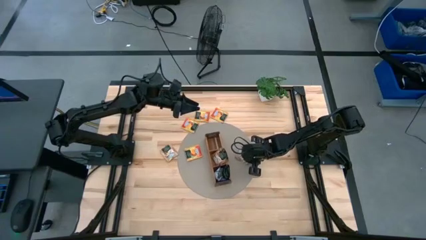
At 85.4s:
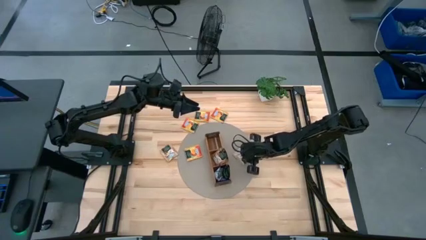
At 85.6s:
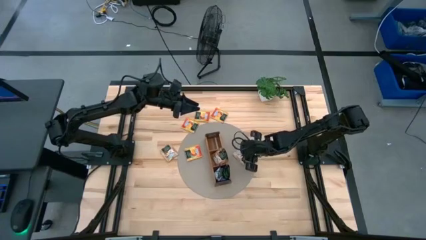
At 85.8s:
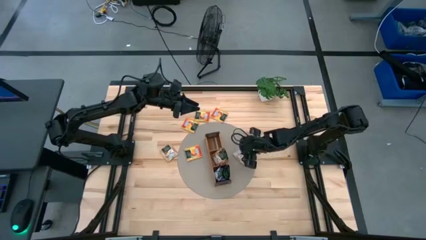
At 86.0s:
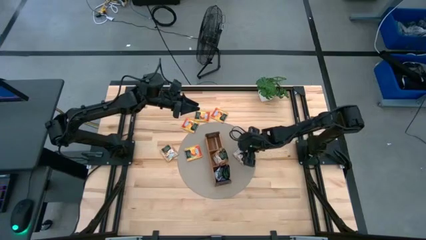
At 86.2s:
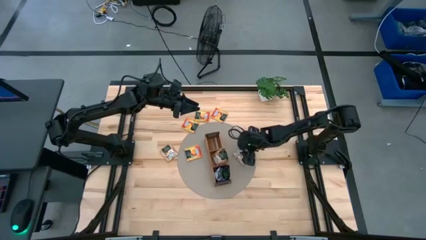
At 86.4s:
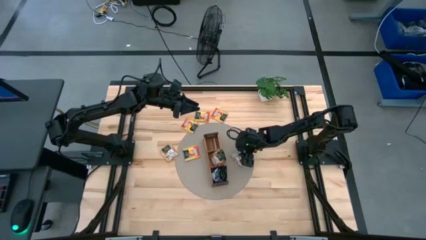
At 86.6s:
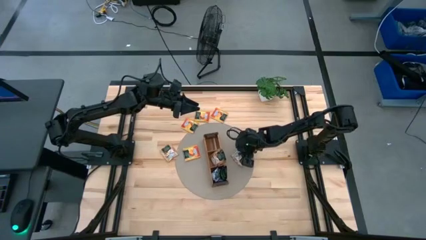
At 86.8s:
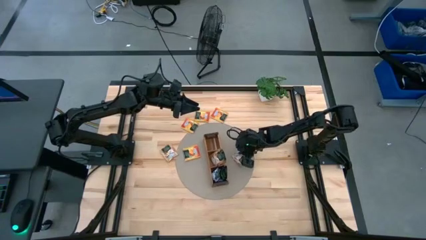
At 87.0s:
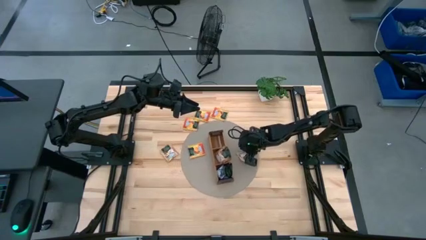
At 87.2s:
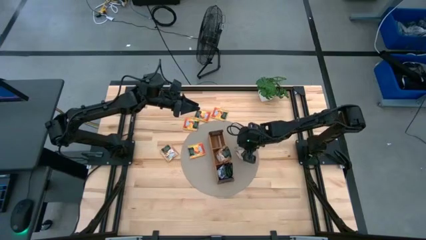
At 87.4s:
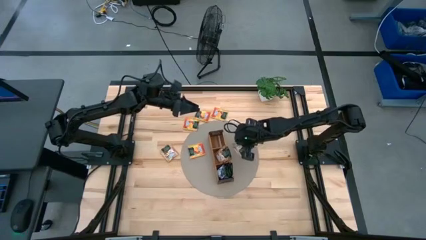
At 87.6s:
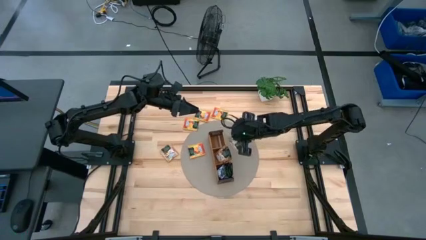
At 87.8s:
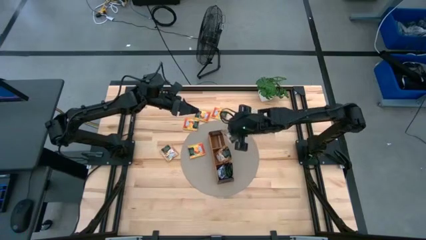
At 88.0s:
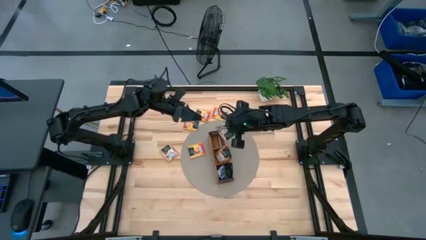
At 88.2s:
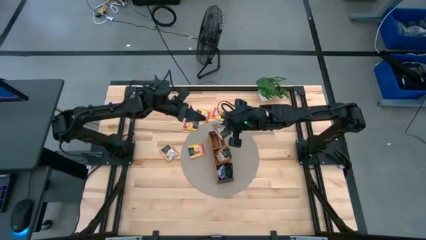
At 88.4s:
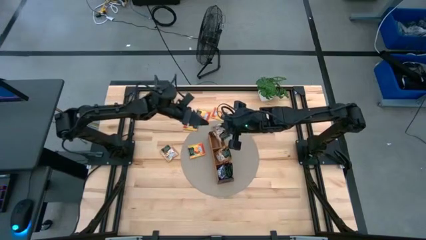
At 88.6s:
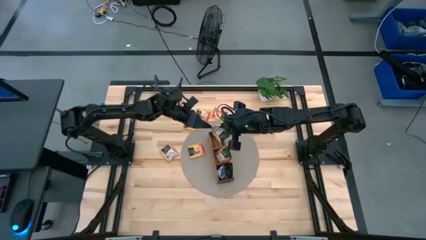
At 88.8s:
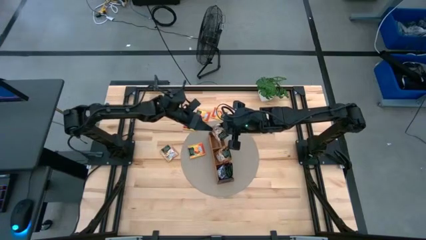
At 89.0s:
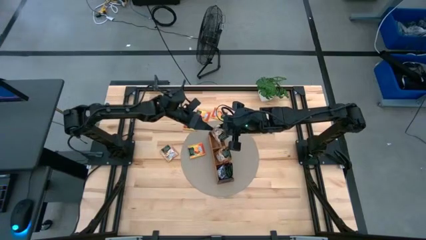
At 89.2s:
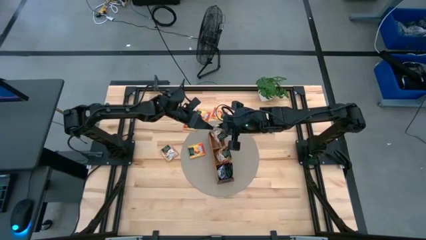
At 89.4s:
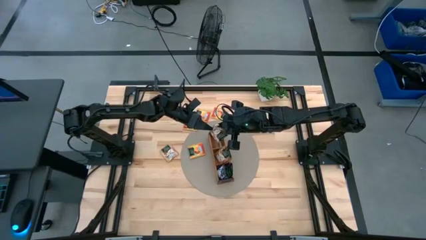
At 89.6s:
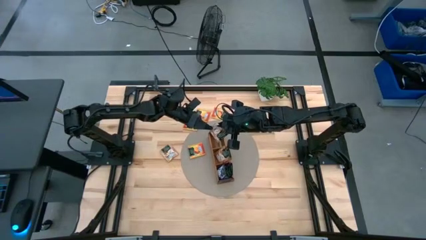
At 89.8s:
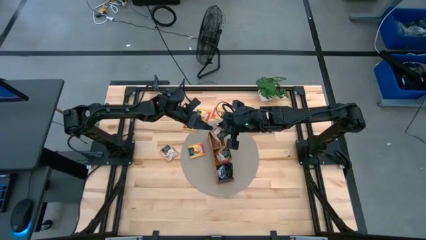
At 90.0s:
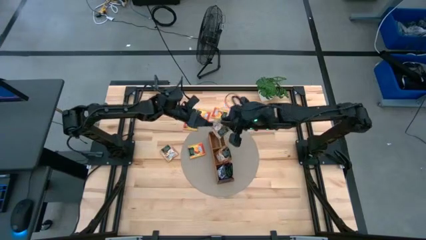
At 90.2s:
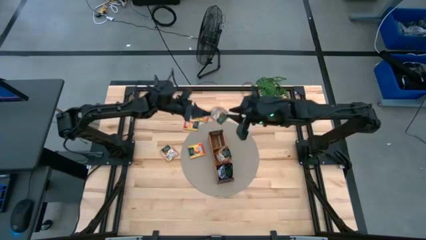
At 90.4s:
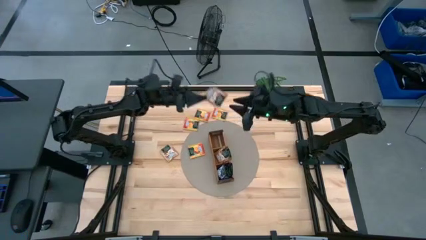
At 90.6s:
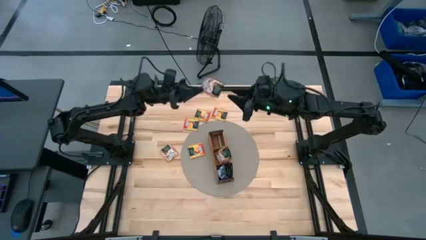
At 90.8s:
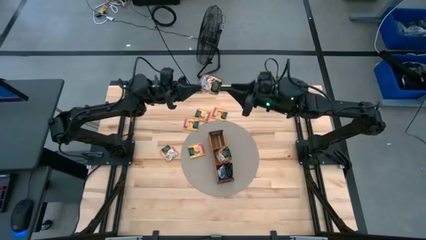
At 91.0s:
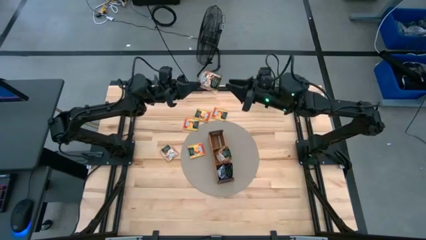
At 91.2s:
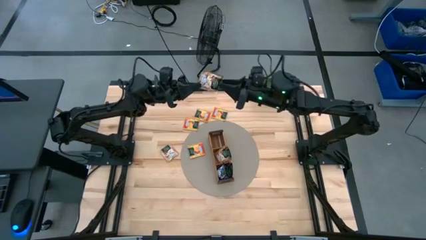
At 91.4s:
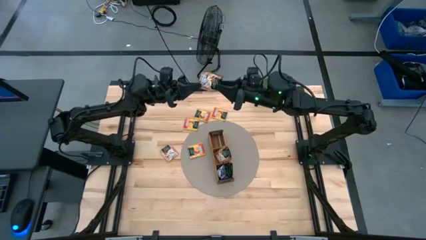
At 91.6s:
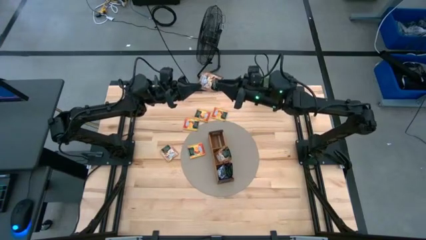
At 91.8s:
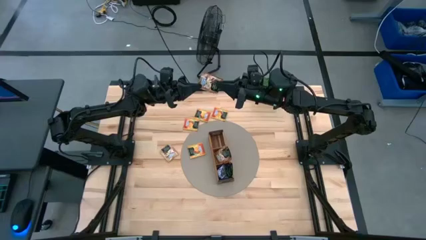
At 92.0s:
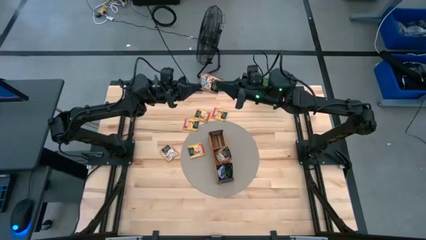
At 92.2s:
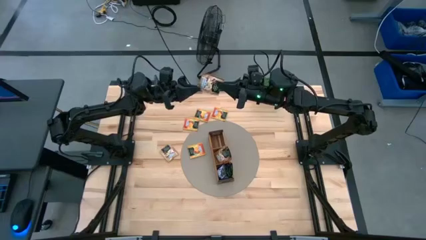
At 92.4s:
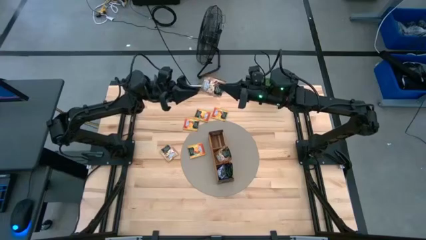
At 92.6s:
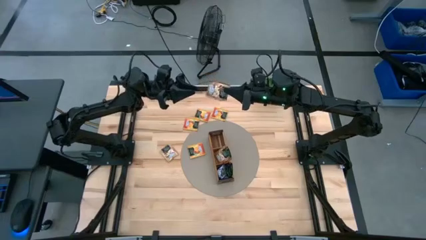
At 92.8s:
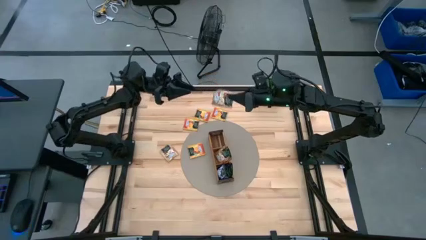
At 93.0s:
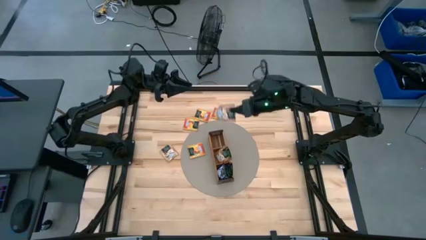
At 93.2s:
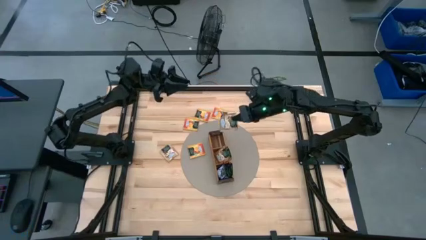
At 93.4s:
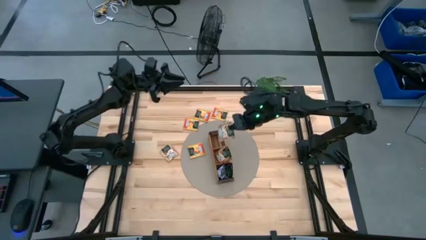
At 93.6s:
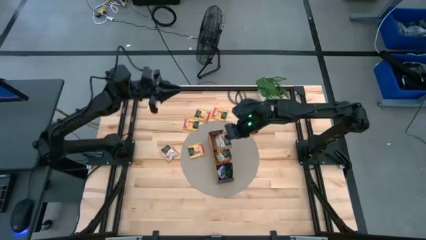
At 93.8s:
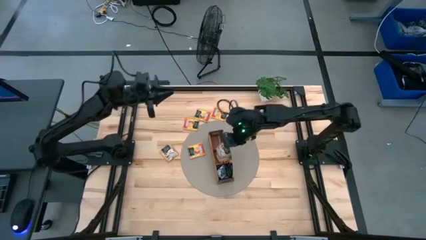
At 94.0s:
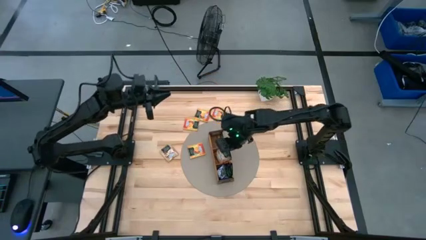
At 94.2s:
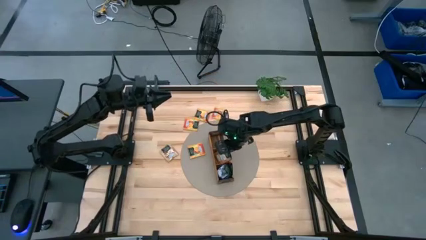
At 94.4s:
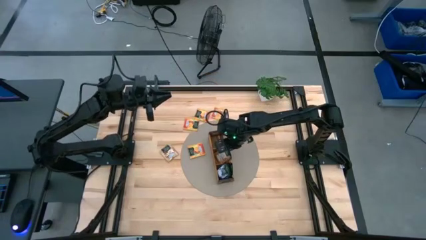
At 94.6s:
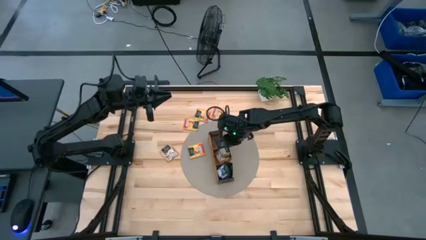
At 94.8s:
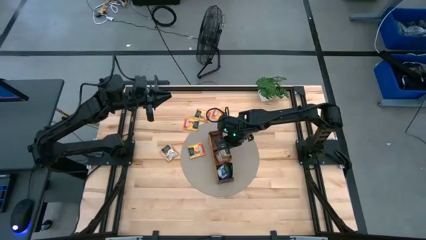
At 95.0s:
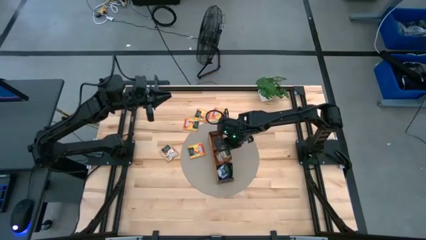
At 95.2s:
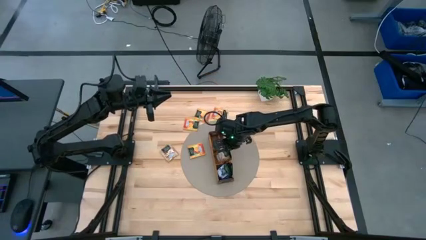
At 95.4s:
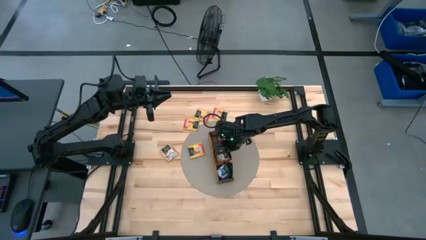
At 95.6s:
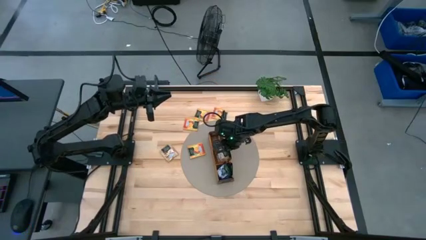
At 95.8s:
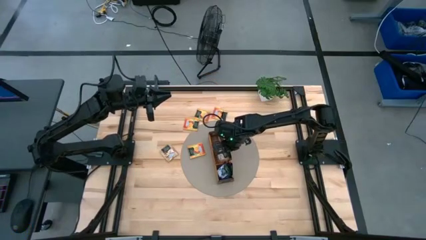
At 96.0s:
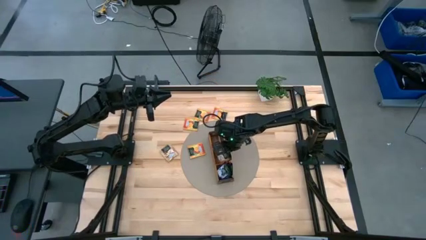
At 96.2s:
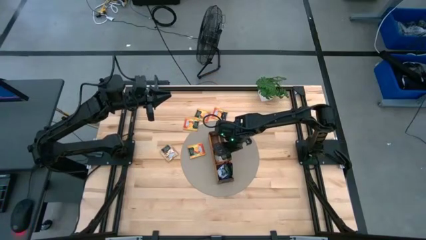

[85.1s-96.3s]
Task: Pick & Place Tea
Put the brown tea bag into the middle section of the wooden organizer

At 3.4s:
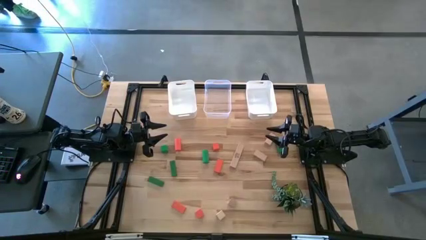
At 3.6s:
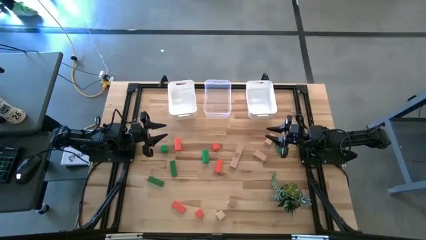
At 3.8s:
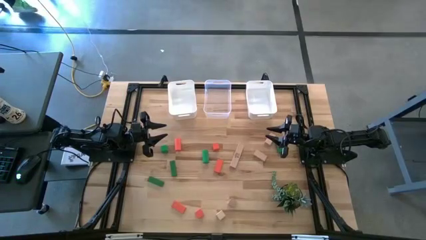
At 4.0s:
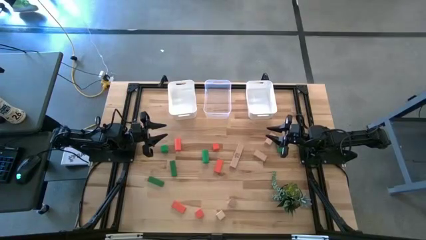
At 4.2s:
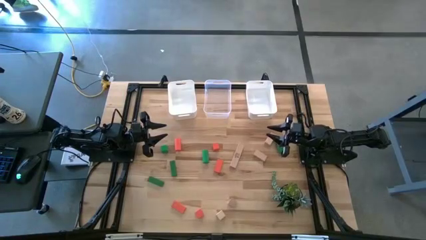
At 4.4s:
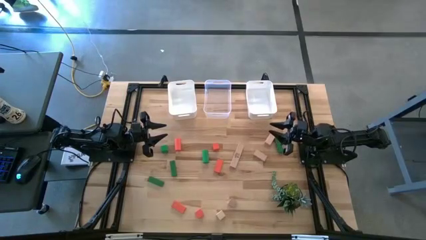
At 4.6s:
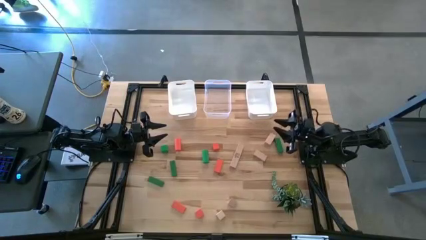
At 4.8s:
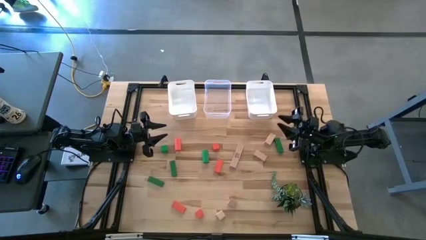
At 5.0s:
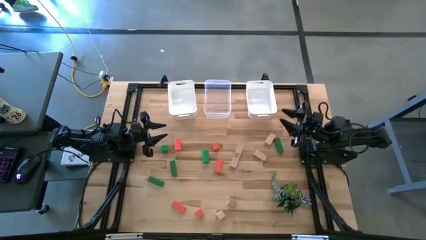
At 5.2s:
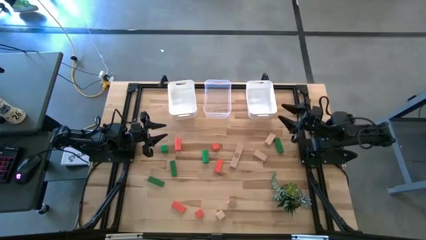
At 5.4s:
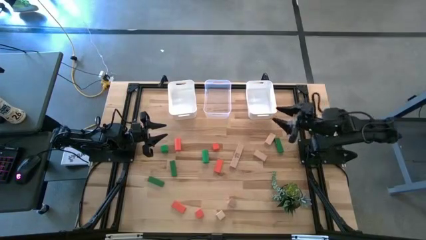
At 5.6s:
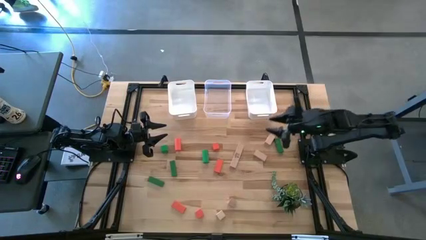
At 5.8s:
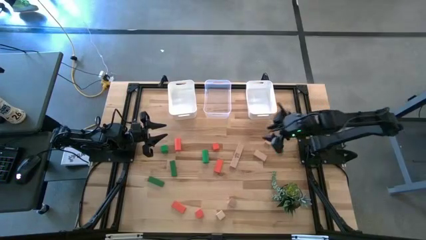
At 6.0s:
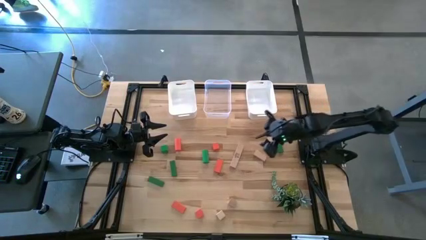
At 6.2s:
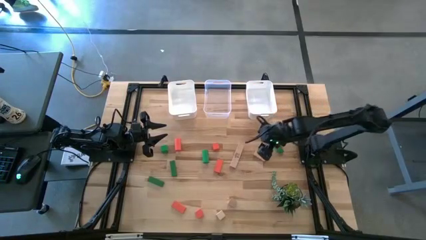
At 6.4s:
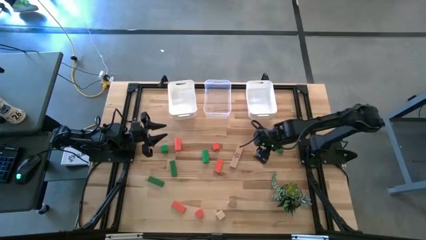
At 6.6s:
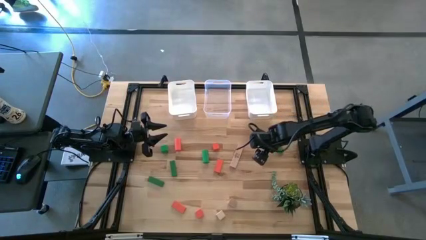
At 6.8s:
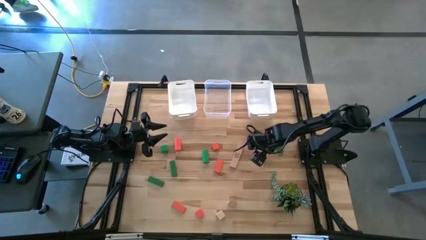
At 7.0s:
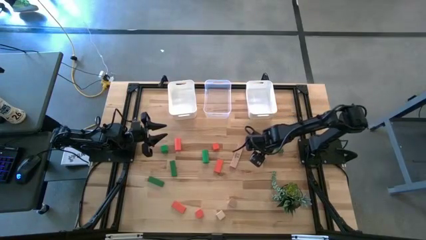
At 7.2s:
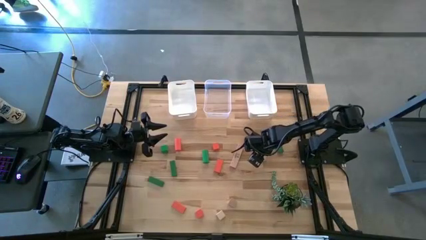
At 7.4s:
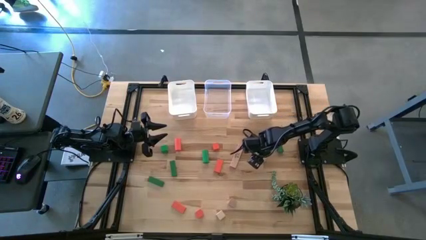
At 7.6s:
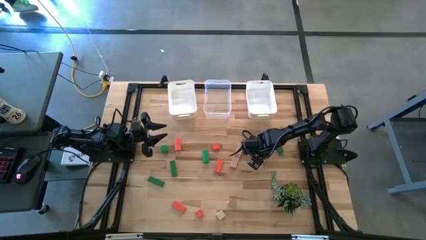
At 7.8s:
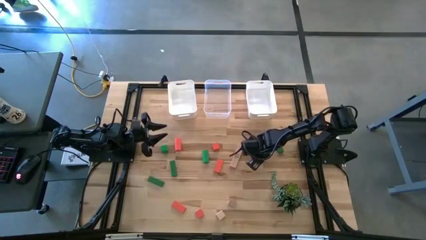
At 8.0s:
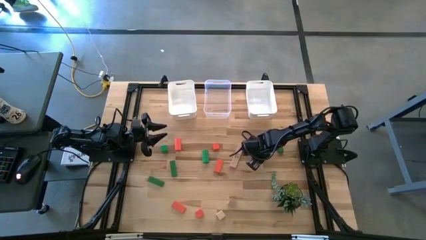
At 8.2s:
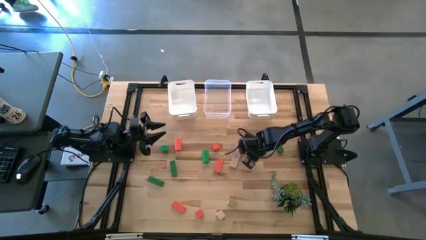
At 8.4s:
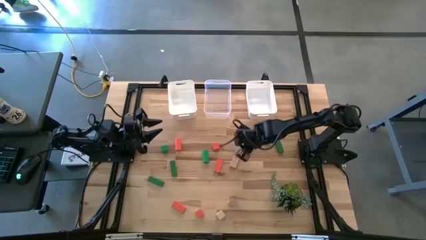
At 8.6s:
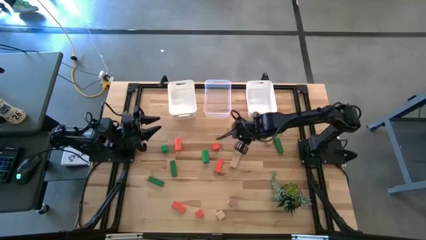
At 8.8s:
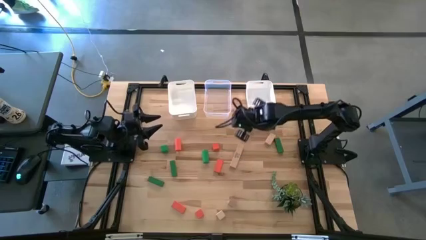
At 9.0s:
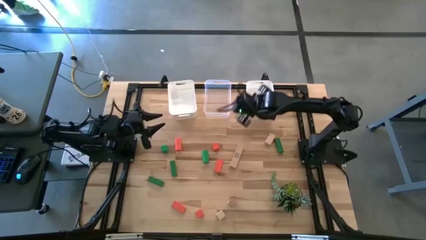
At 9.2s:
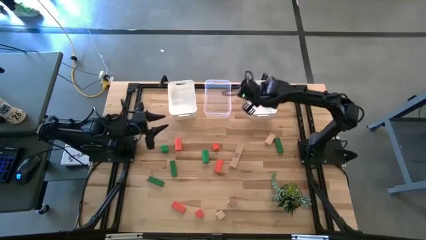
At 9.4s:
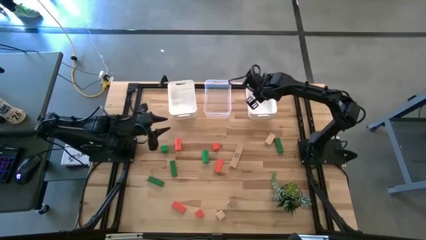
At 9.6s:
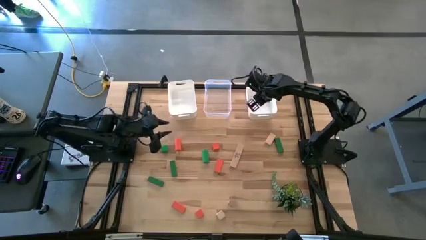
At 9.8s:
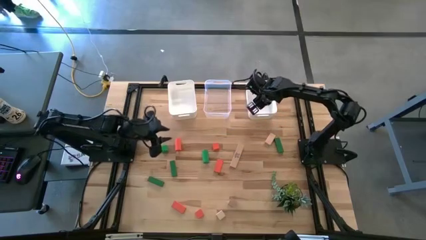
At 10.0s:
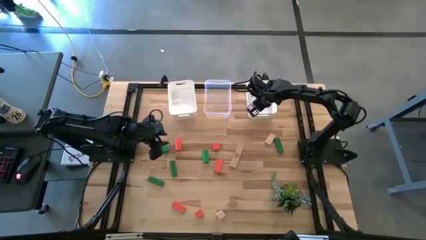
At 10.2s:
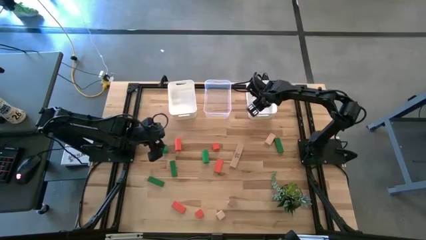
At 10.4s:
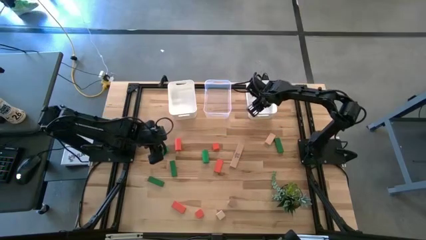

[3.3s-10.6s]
Task: Sort & place blocks by color
Put the brown block into the right white bin
